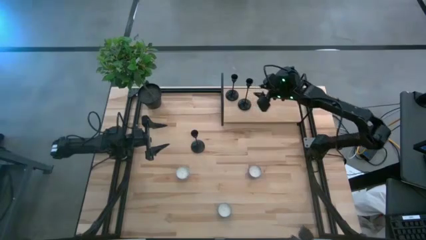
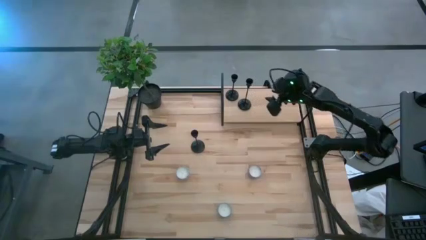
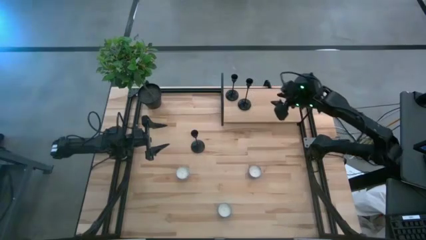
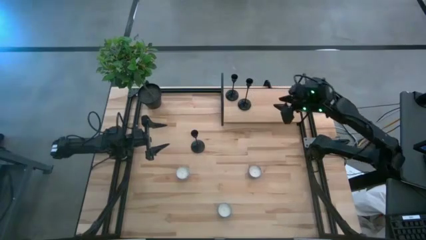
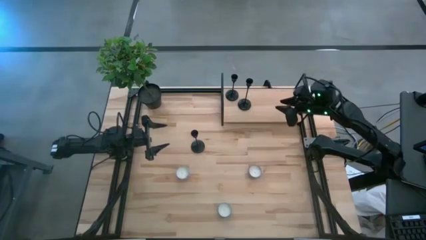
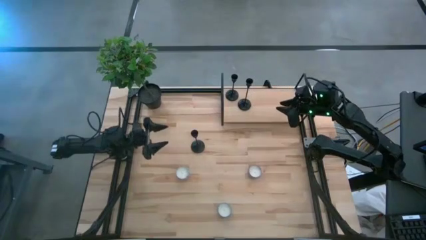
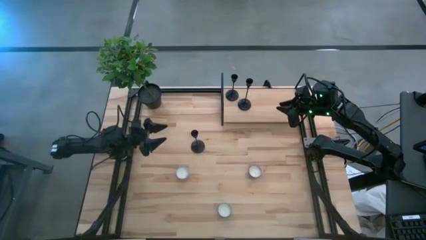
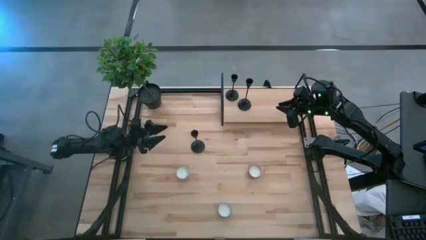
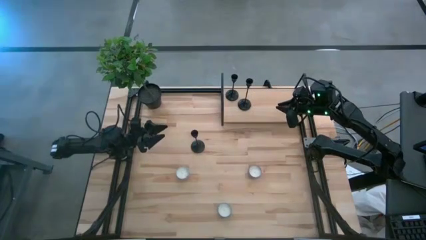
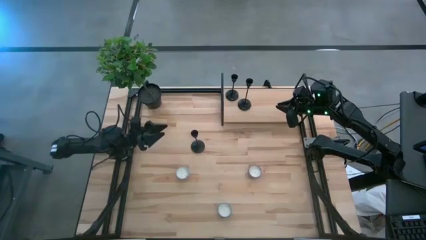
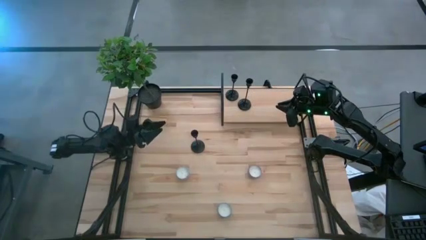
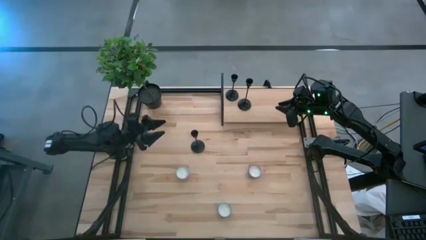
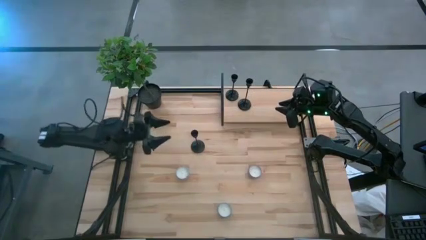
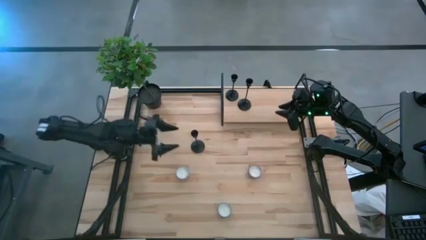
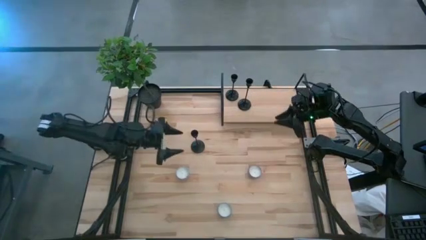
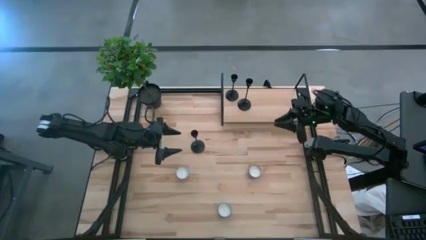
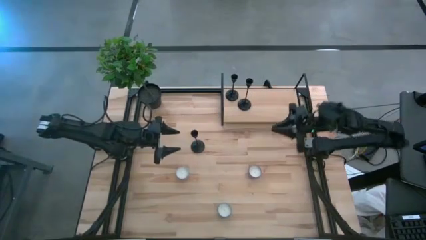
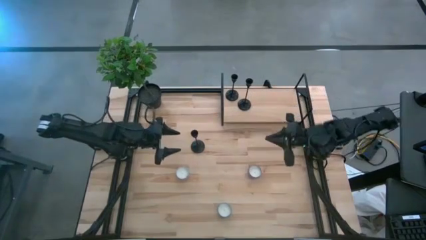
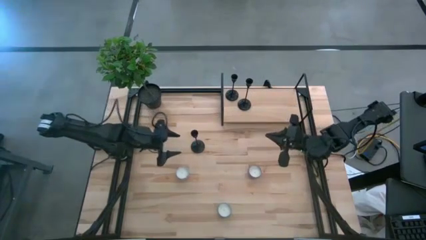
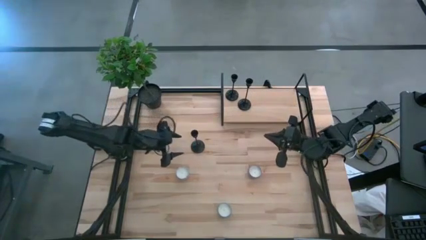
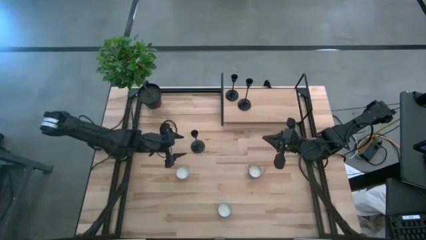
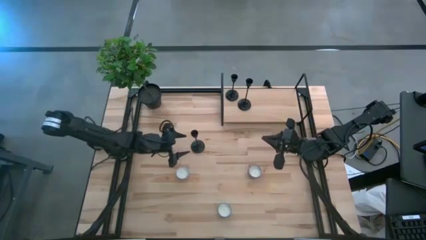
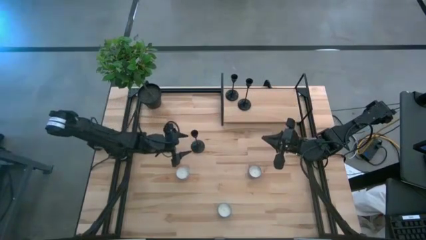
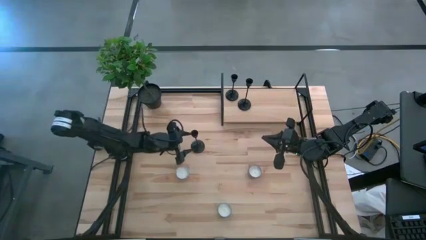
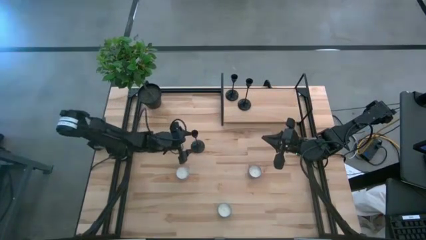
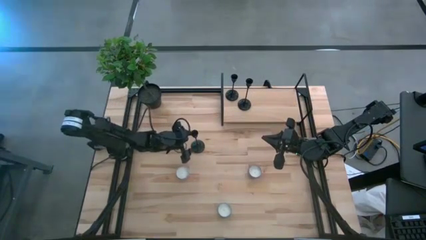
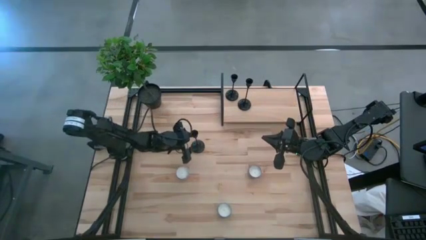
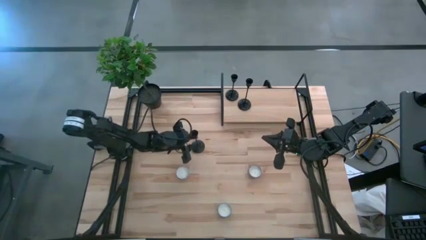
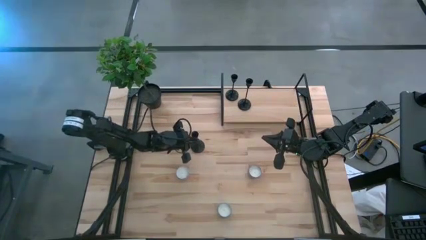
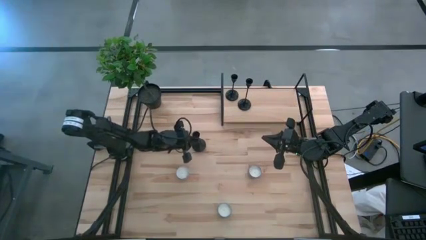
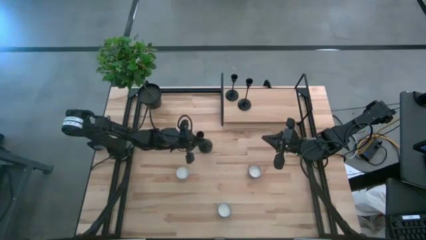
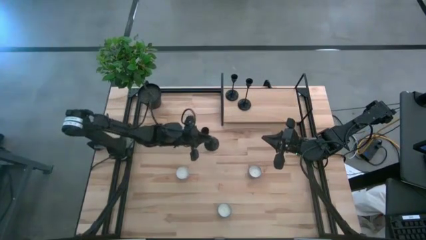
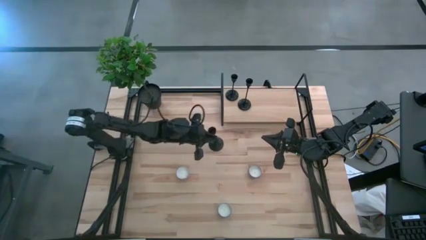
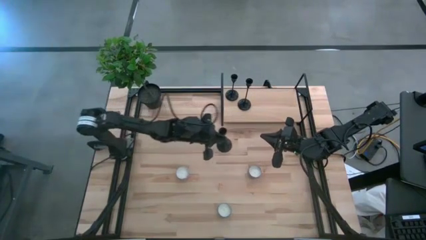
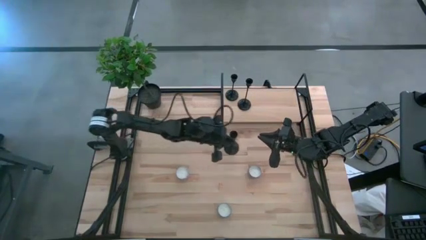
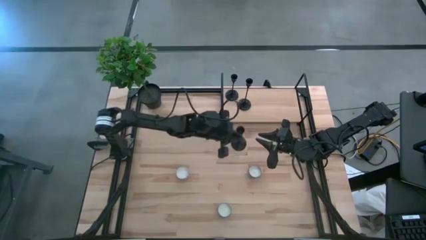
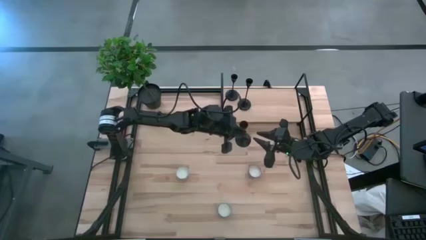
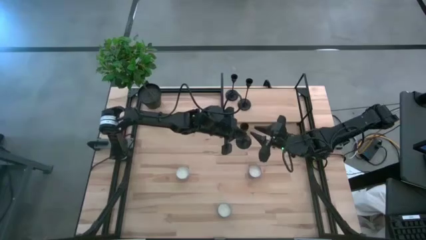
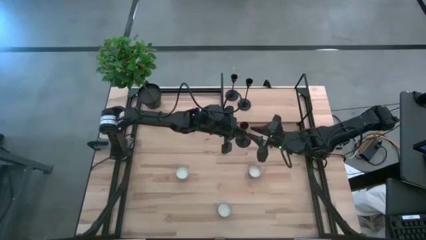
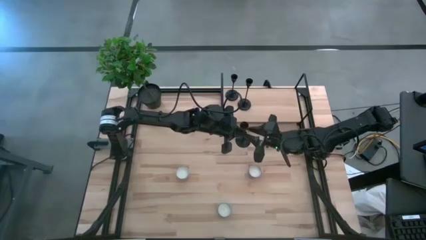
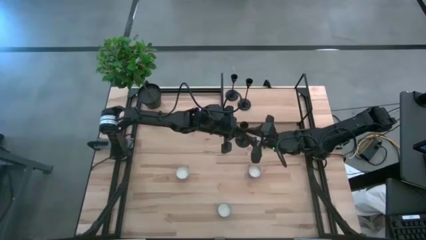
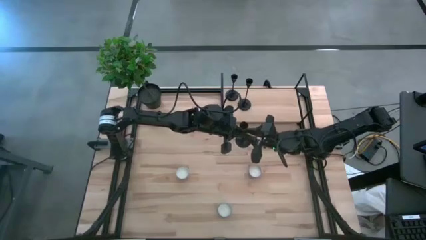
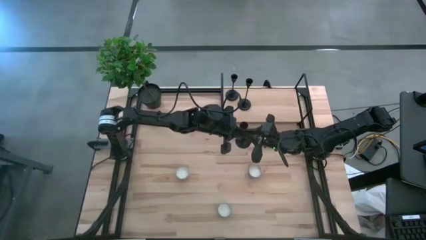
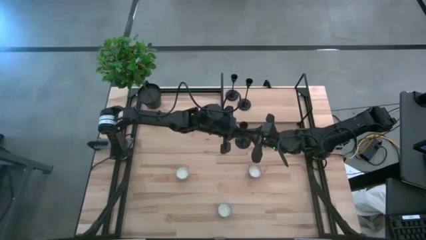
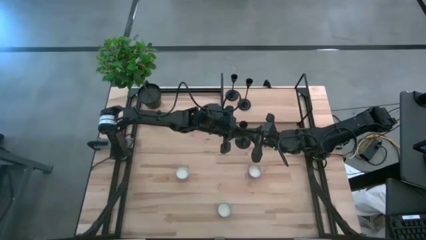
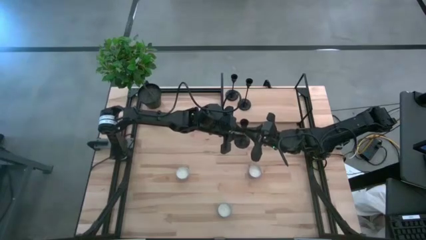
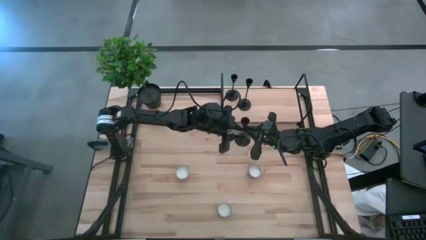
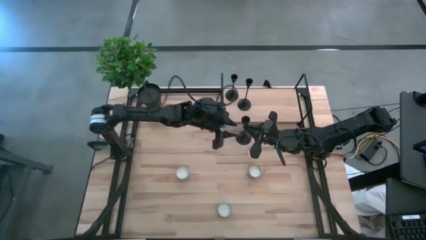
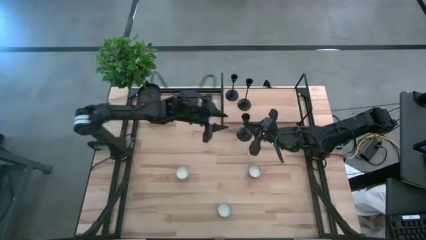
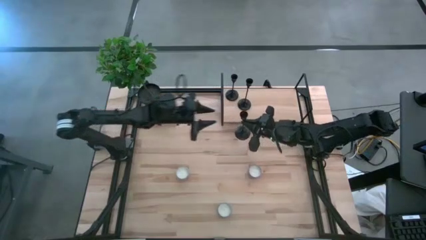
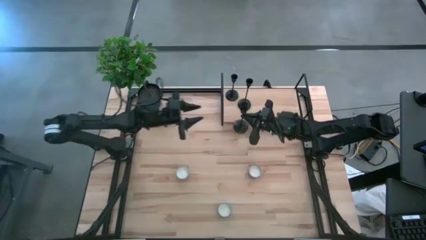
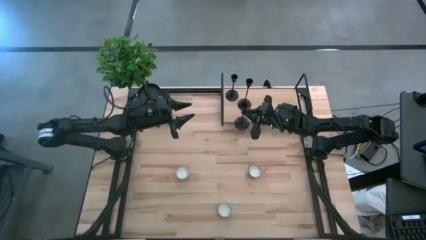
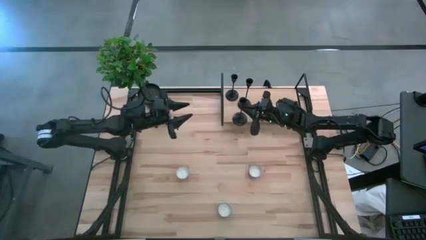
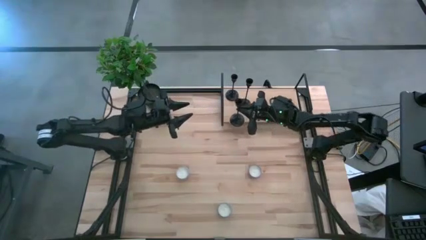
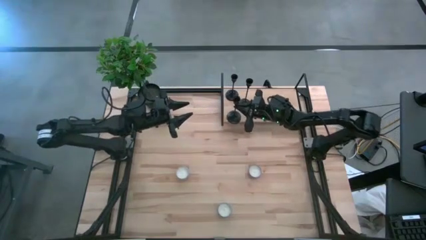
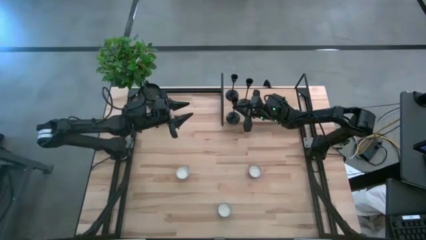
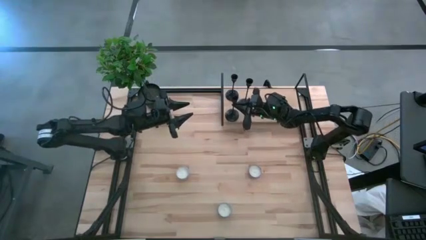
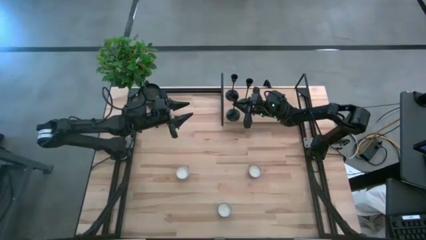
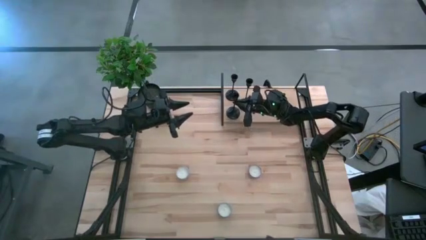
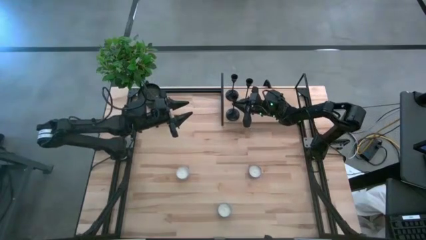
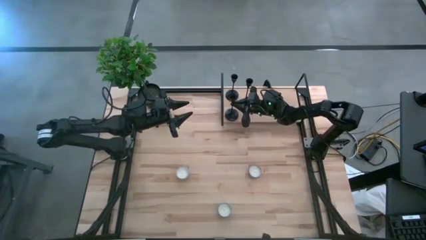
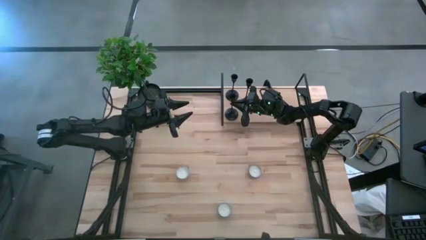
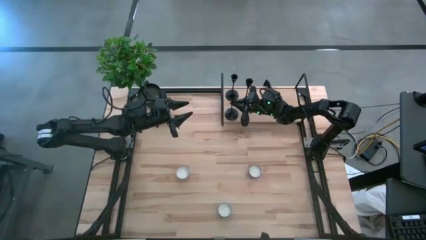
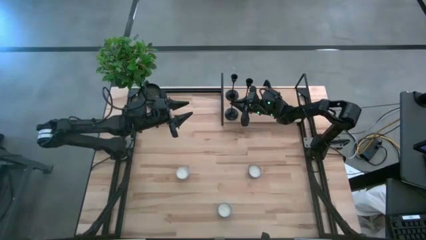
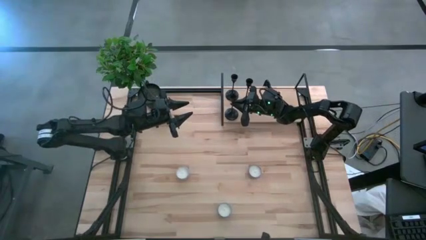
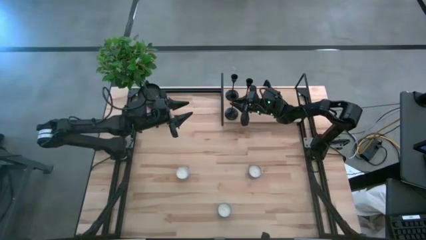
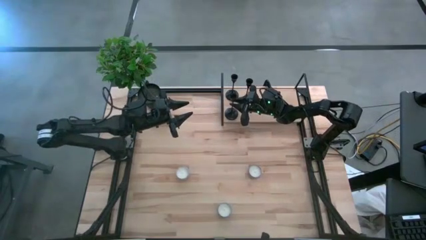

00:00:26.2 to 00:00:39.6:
Task: Pick & Place candle stick holders
Put the black candle holder on the shelf
